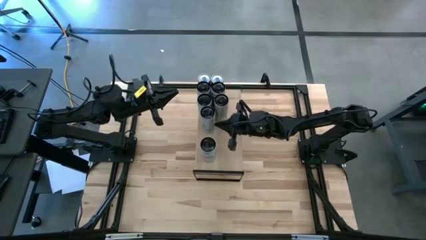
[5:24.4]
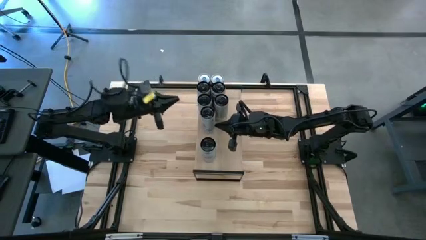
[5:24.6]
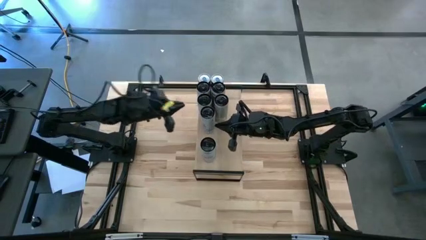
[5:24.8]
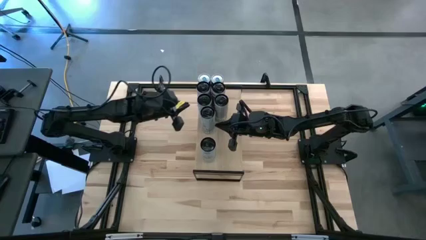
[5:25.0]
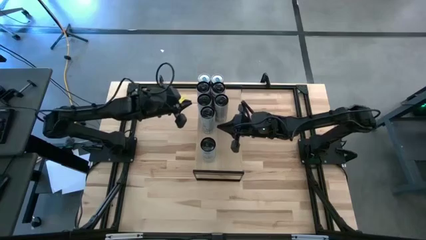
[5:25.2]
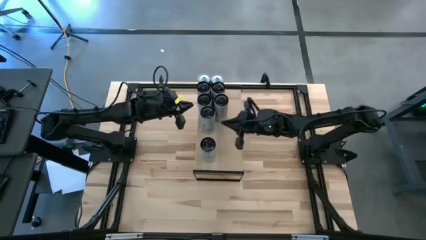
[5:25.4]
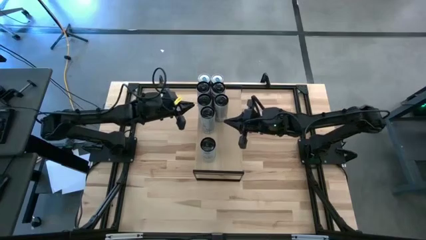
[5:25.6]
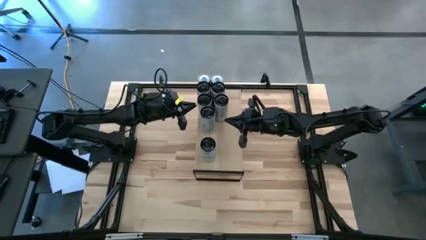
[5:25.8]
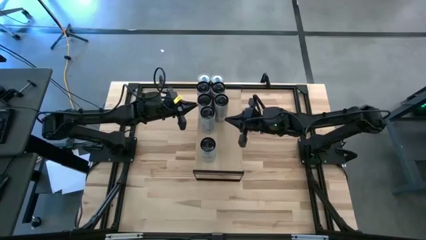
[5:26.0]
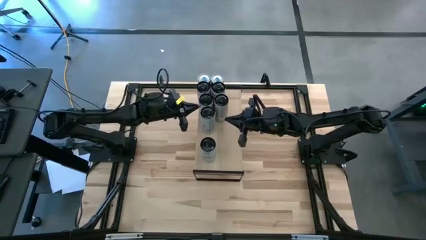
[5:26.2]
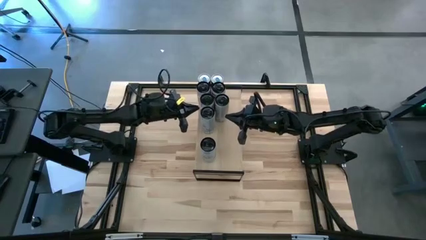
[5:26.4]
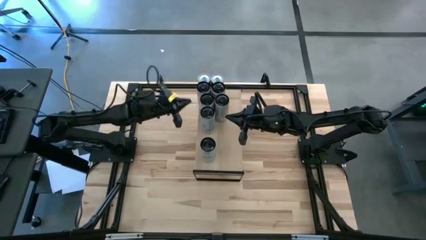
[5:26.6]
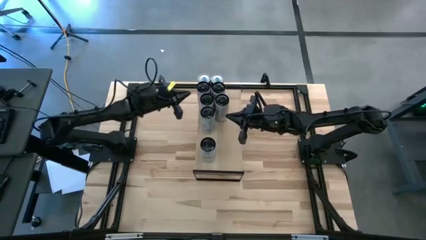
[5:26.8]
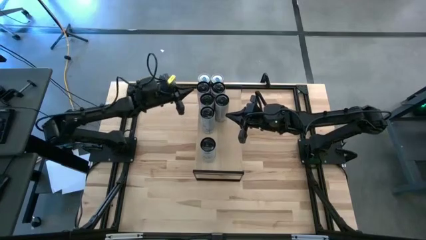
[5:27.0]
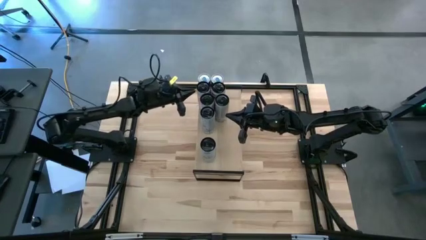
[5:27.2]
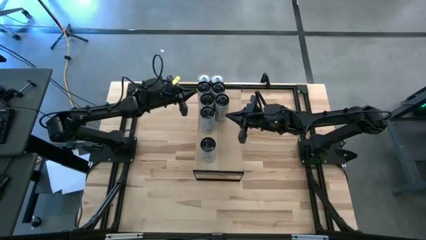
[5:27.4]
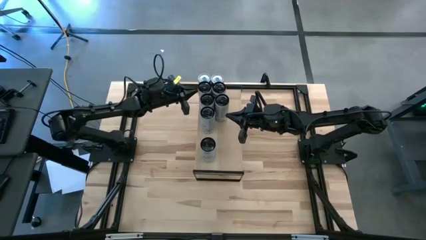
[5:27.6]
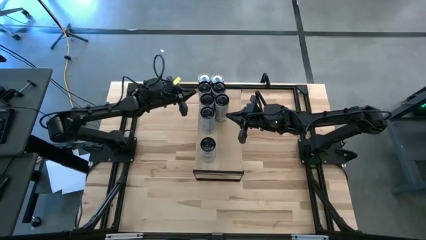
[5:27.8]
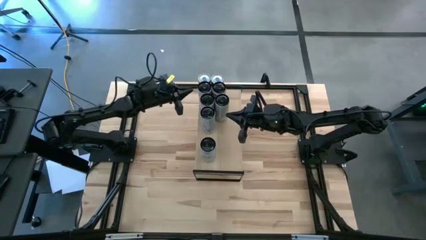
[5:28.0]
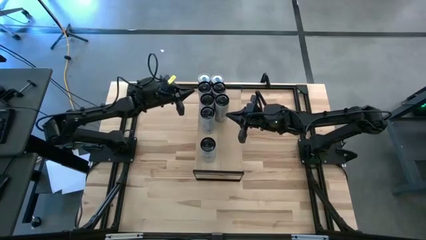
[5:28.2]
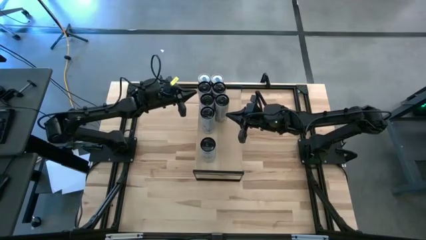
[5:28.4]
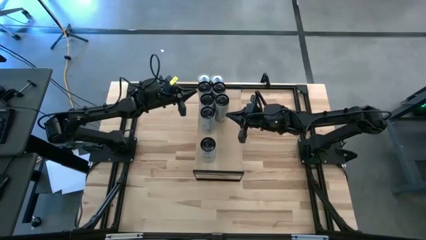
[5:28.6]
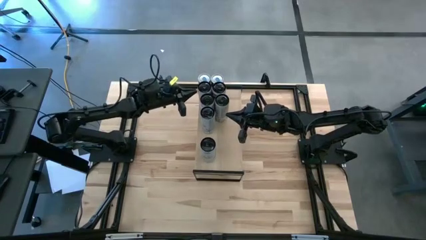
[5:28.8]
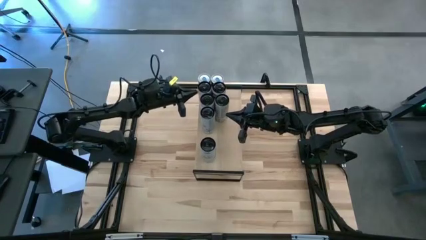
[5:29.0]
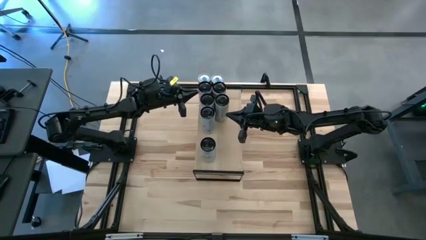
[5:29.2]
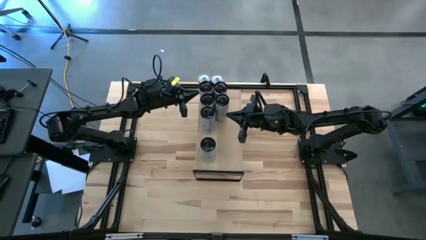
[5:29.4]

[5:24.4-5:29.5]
Task: Place canned beverage on shelf
Adjust the soda cans on the shelf

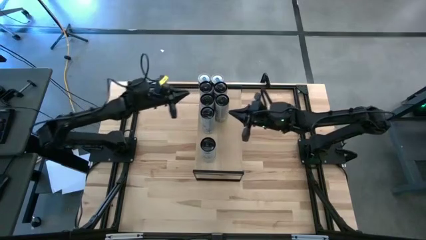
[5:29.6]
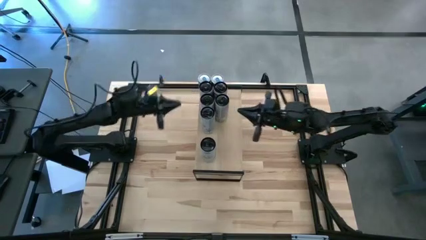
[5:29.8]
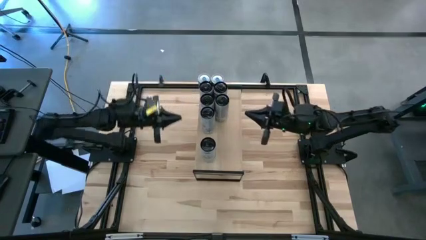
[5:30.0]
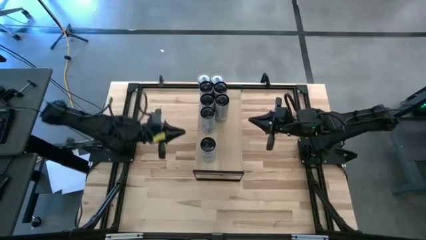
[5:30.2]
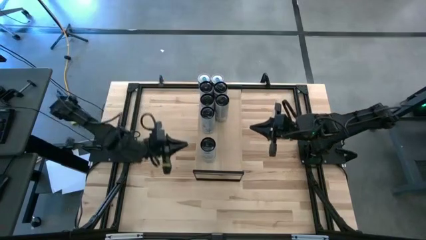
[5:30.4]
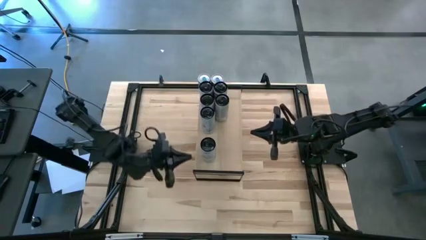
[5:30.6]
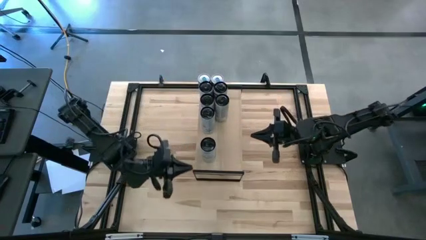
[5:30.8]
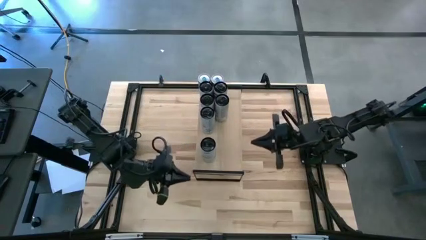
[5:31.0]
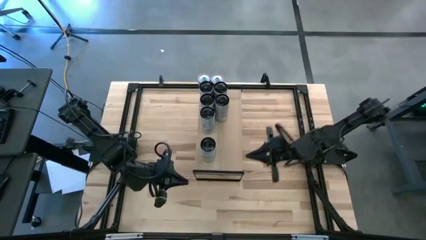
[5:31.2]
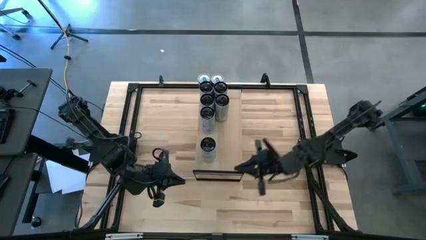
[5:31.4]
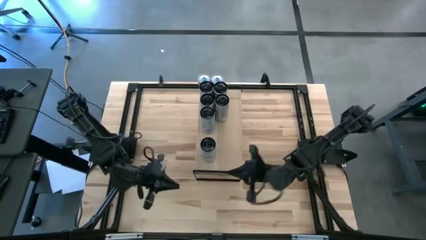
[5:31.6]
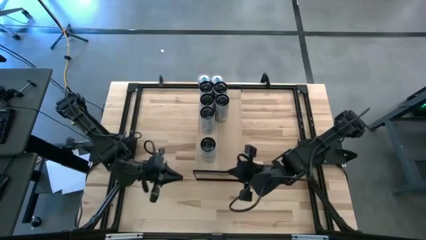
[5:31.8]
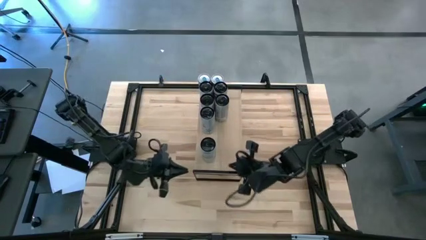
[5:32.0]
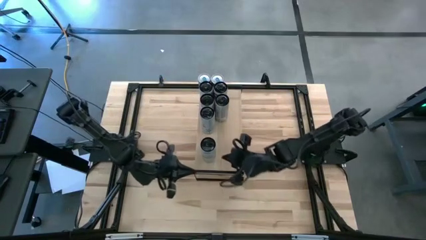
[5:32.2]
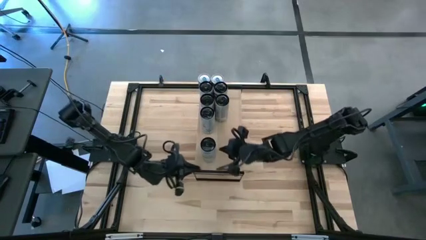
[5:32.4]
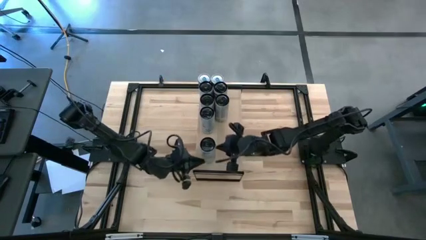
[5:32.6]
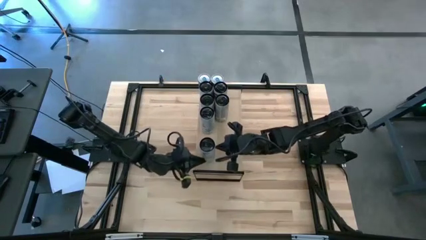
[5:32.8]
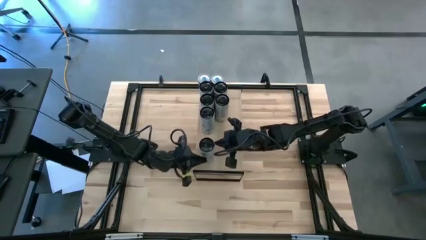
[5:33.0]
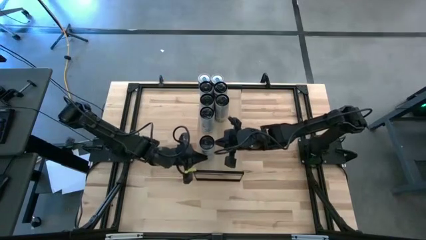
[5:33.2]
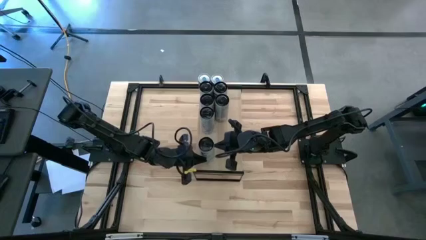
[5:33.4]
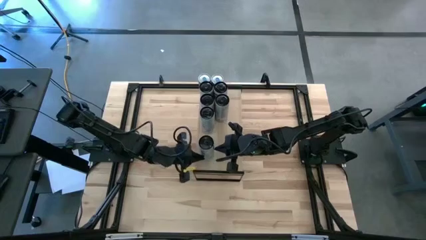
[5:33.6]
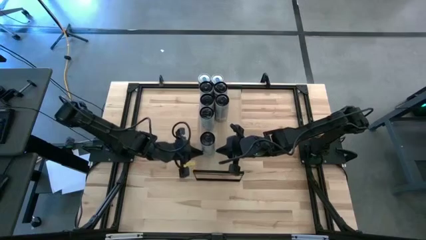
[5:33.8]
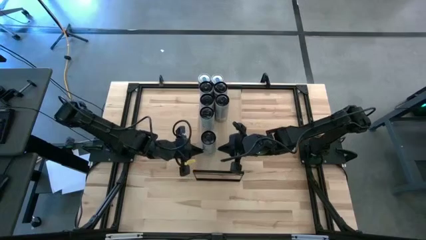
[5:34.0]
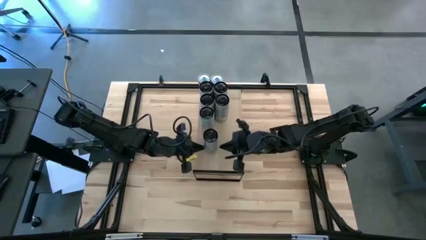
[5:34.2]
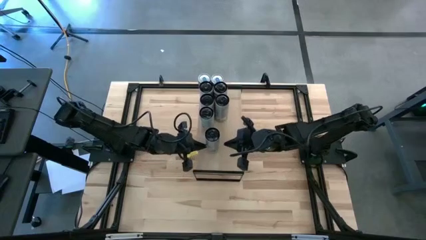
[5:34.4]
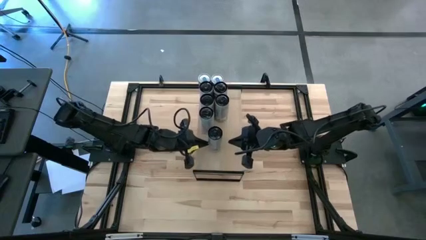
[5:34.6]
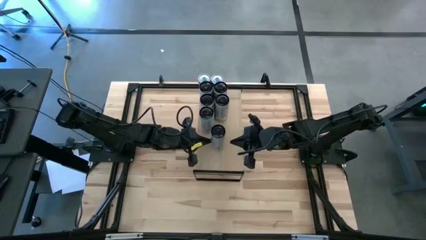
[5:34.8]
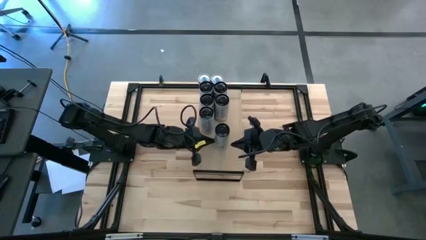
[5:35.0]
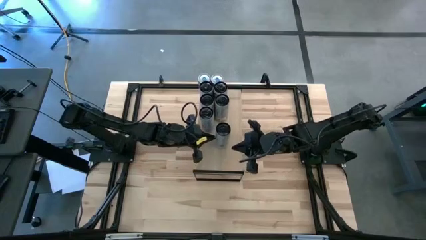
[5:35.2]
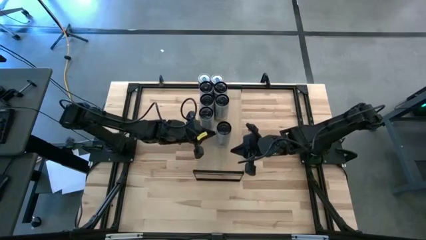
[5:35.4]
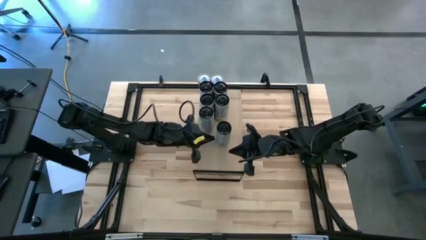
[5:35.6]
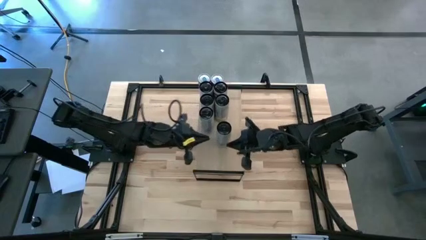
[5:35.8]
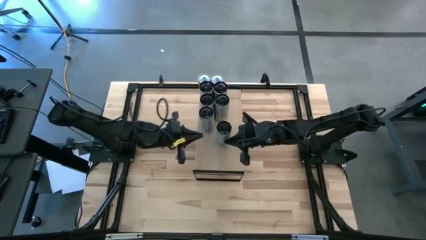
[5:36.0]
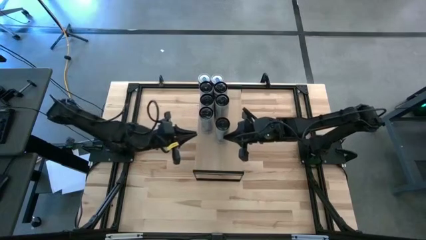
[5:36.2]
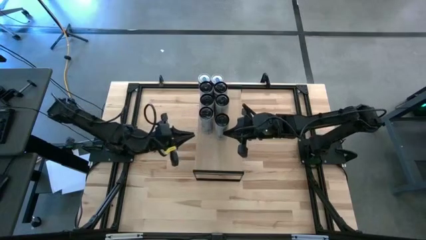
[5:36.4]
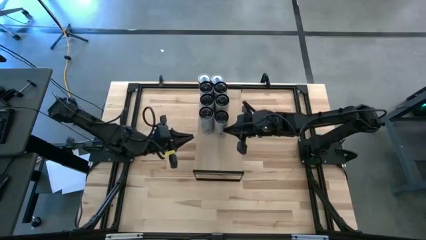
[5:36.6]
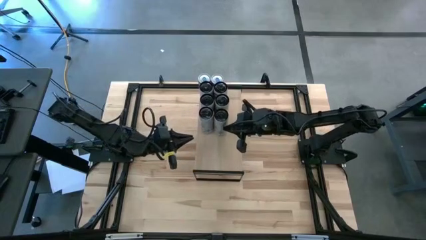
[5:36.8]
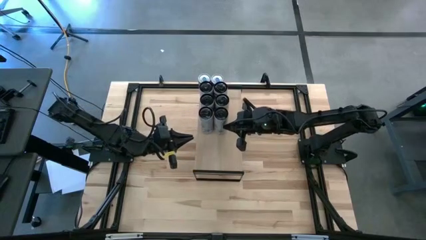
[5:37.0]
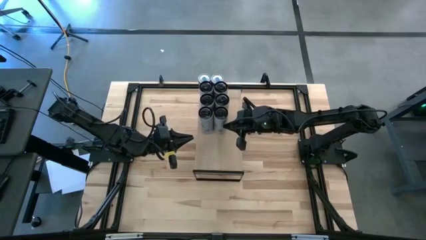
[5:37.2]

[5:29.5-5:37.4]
Move the white blue soda can on the shelf aligned with the other white blue soda can

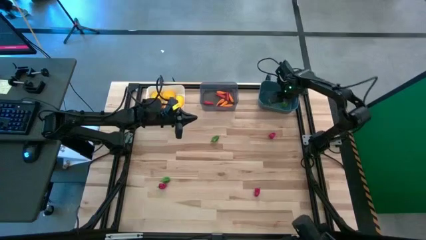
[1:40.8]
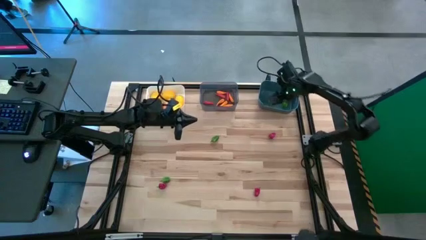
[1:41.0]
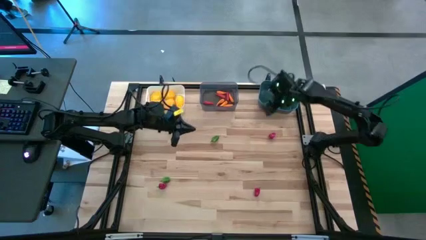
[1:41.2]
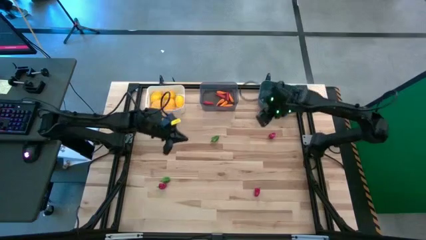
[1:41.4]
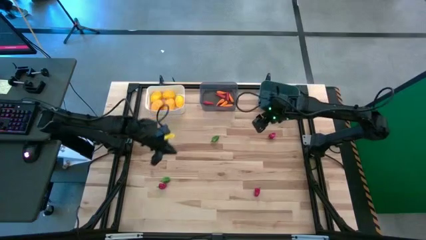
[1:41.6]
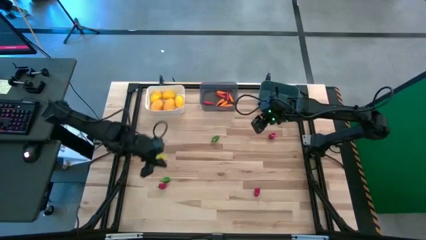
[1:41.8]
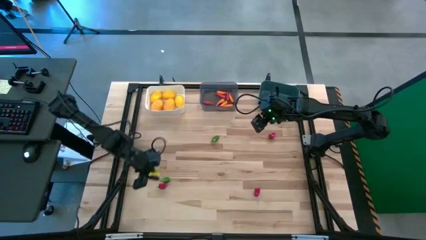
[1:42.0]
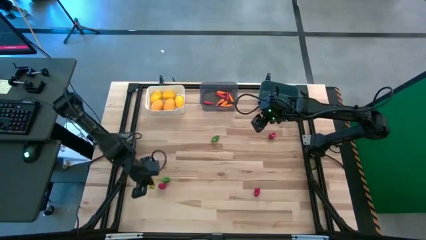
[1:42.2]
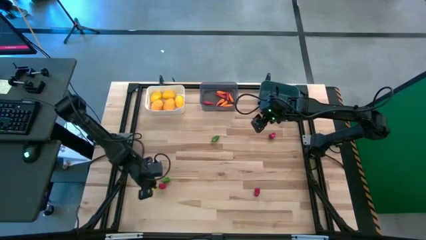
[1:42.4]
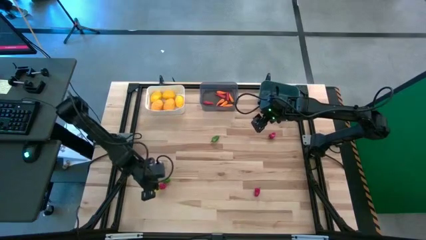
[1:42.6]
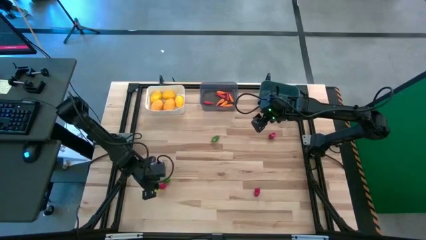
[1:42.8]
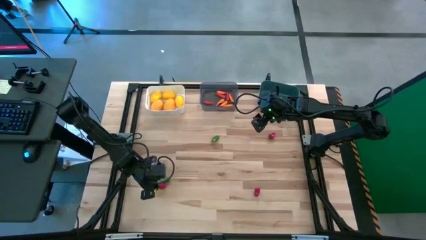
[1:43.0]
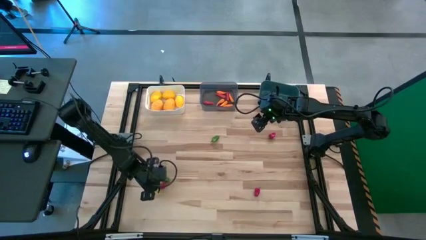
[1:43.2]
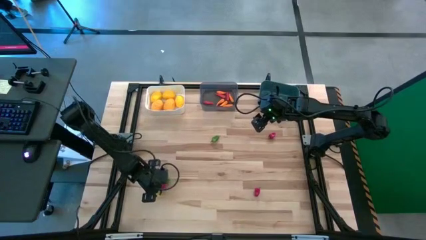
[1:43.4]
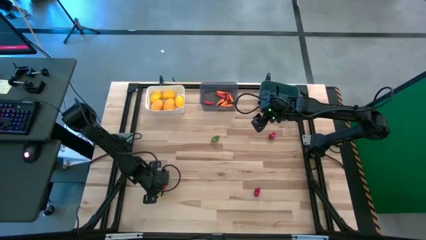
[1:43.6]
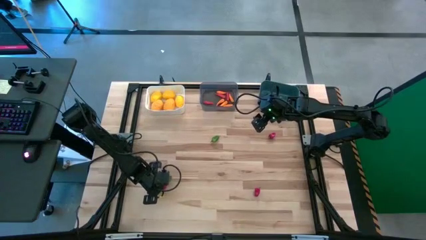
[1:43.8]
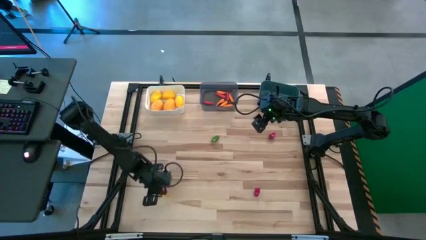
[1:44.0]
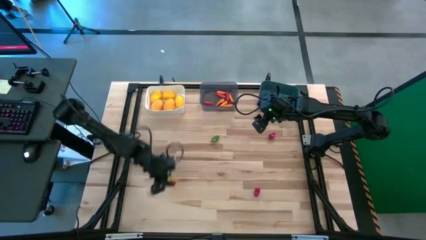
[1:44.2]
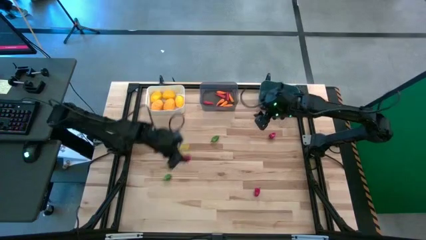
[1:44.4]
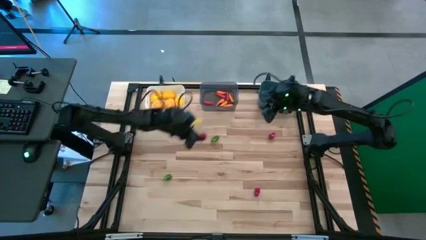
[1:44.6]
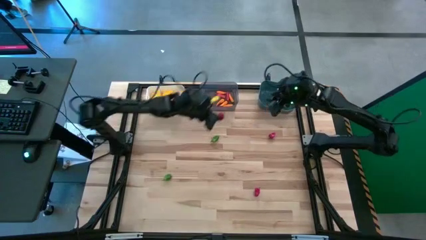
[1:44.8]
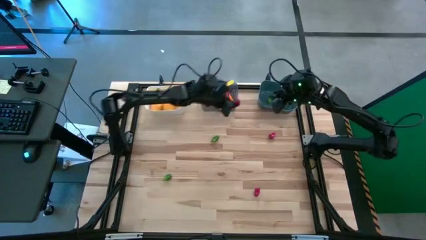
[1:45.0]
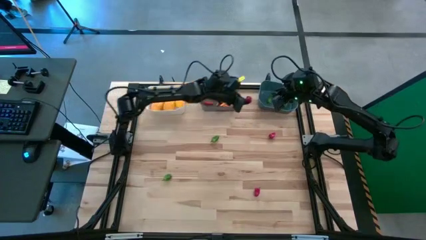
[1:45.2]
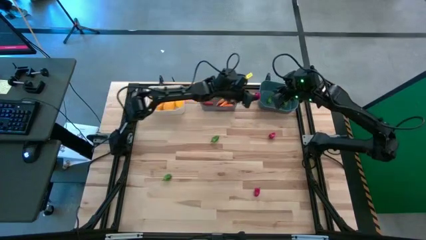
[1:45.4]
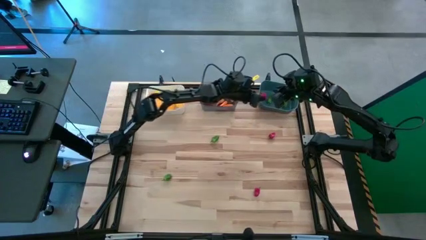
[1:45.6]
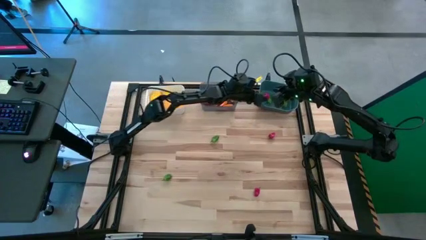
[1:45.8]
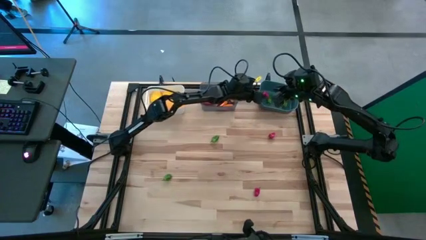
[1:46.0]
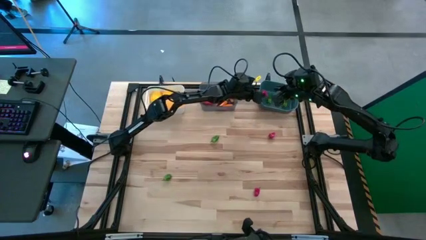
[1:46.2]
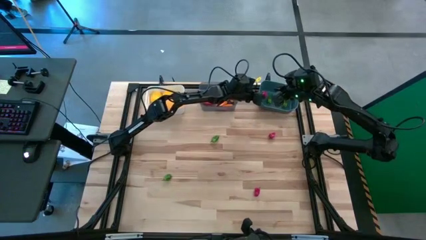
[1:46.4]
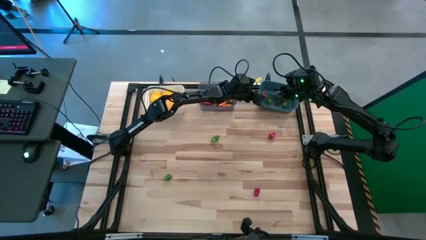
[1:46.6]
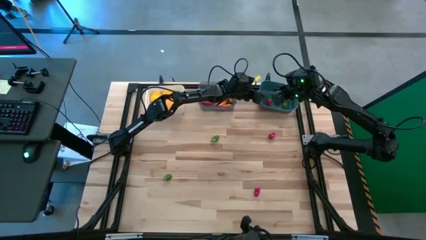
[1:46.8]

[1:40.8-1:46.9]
Task: Sort produce into baskets
Put the bottom left red bell pepper into the blue bin
